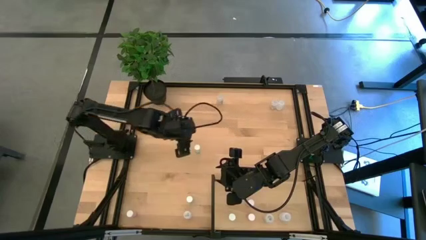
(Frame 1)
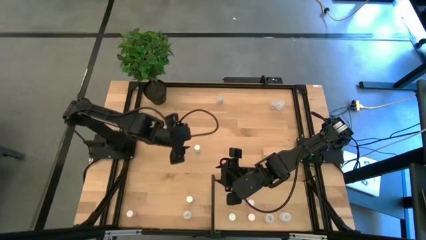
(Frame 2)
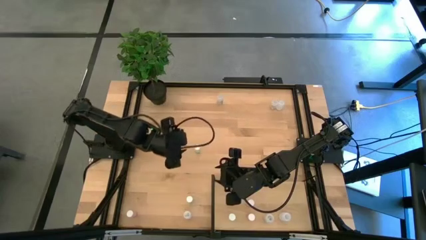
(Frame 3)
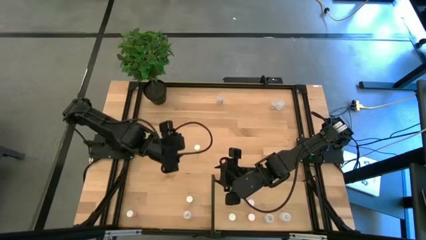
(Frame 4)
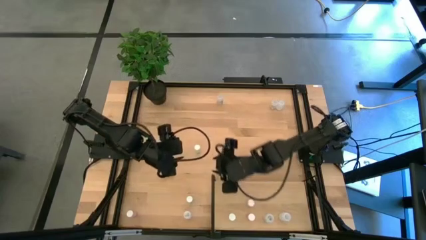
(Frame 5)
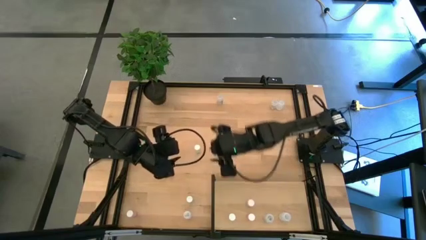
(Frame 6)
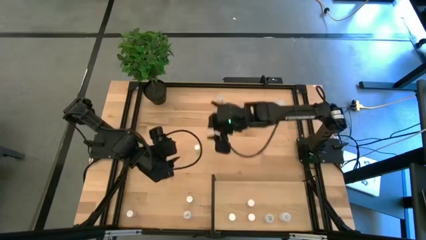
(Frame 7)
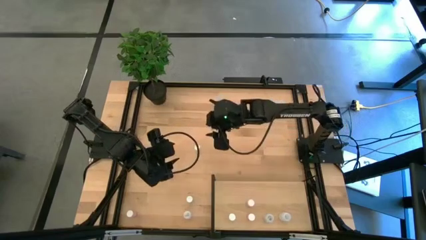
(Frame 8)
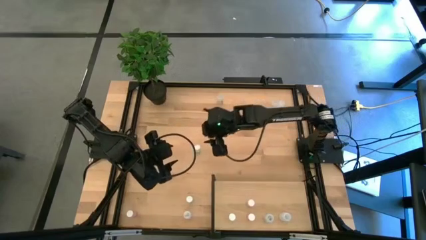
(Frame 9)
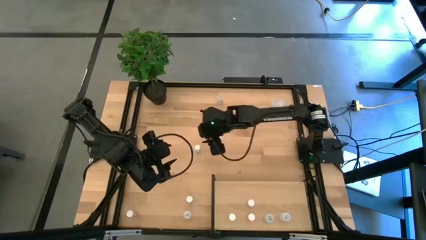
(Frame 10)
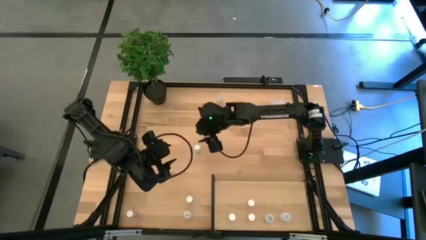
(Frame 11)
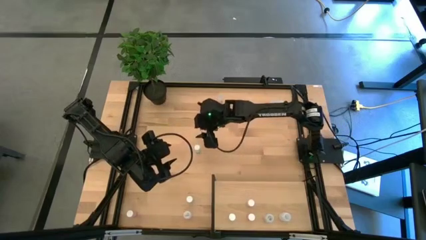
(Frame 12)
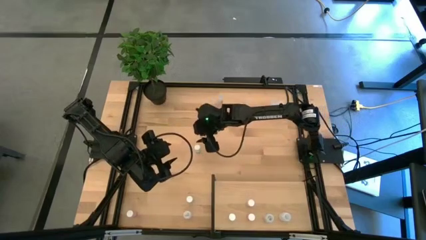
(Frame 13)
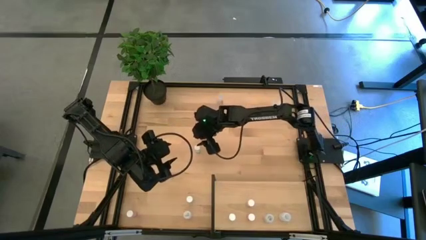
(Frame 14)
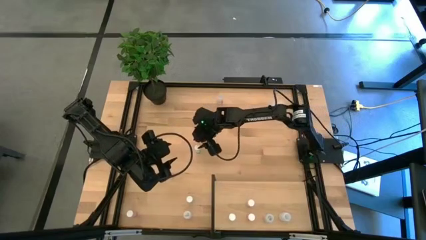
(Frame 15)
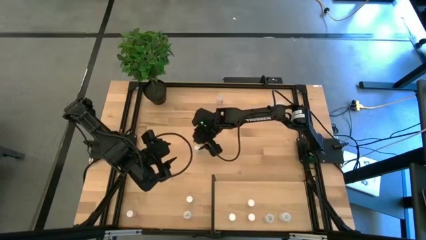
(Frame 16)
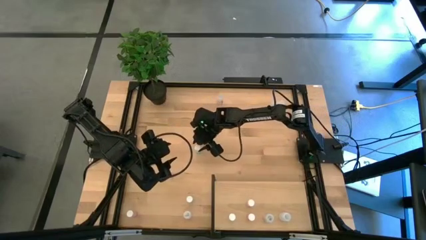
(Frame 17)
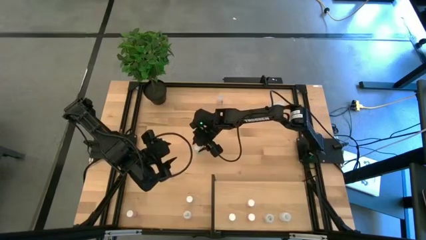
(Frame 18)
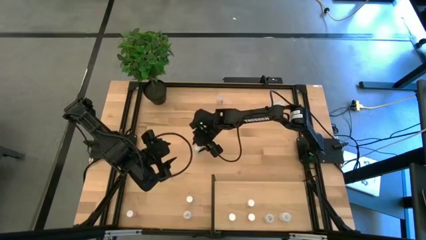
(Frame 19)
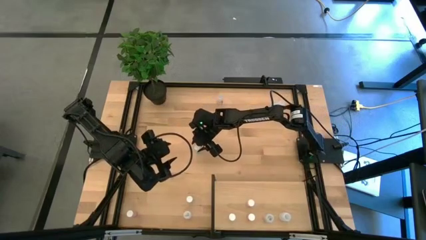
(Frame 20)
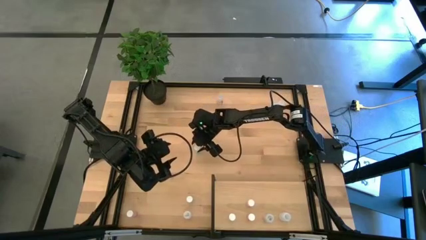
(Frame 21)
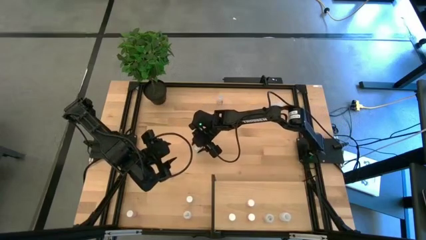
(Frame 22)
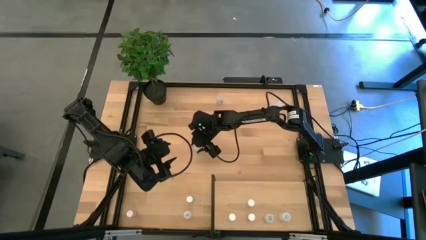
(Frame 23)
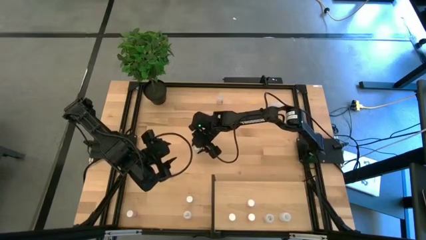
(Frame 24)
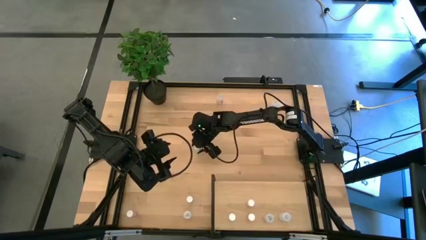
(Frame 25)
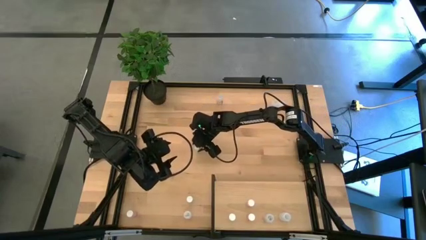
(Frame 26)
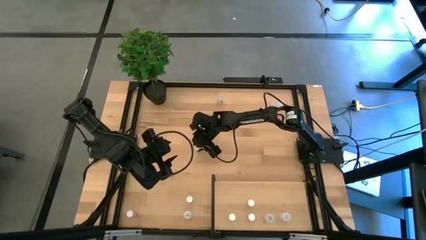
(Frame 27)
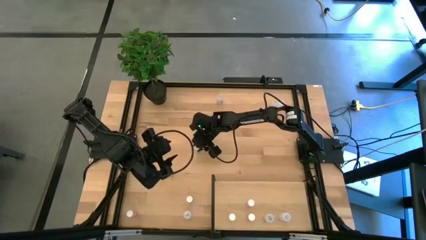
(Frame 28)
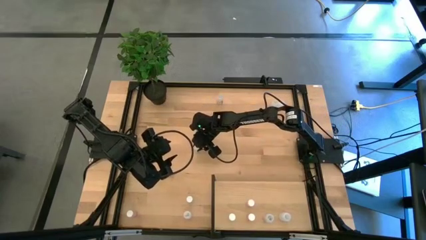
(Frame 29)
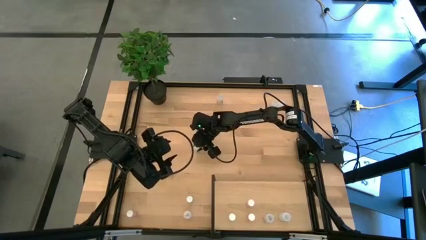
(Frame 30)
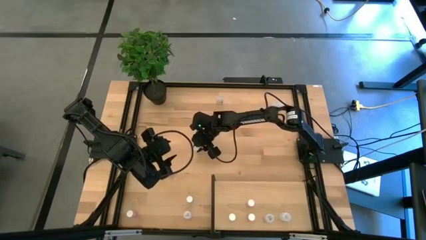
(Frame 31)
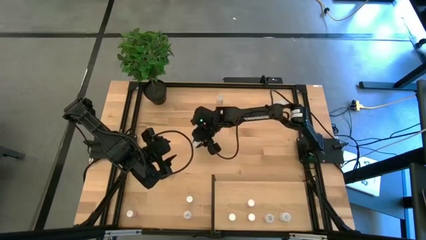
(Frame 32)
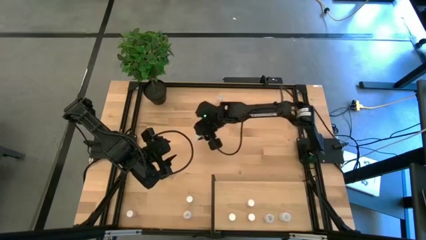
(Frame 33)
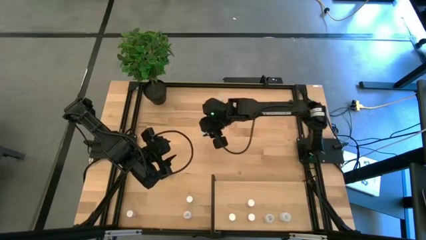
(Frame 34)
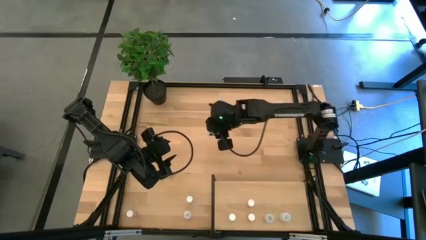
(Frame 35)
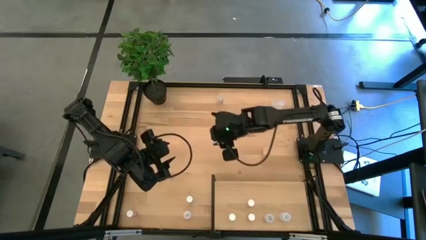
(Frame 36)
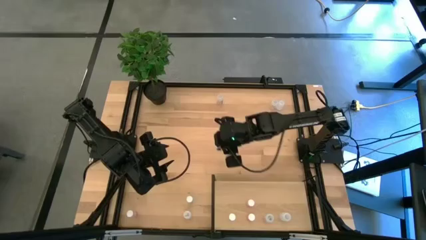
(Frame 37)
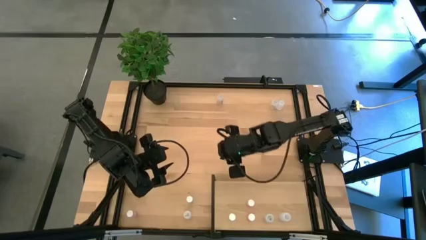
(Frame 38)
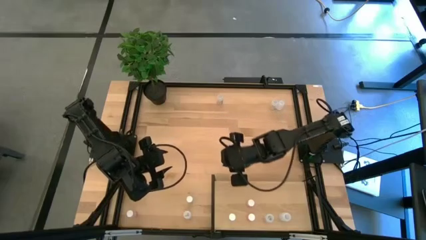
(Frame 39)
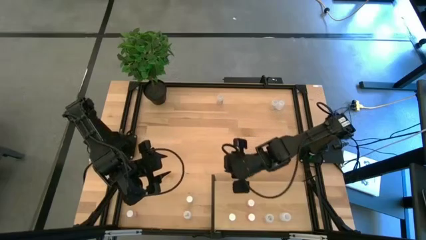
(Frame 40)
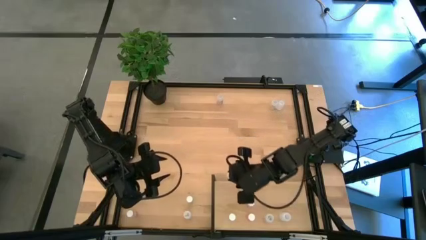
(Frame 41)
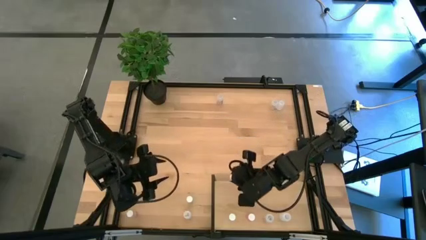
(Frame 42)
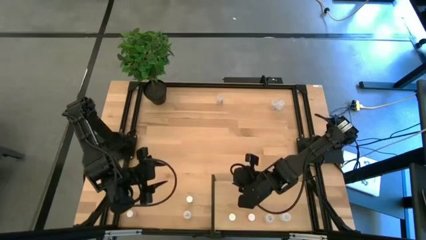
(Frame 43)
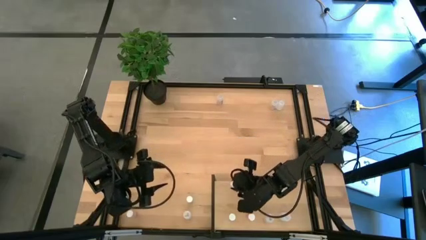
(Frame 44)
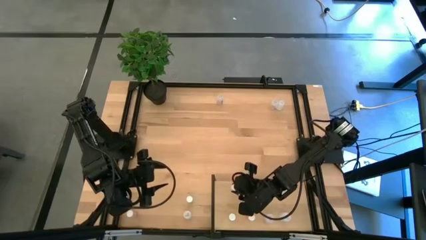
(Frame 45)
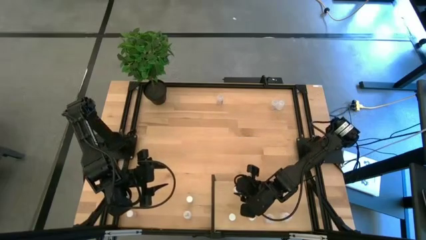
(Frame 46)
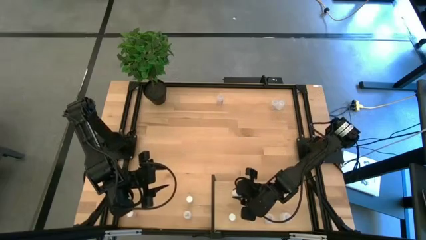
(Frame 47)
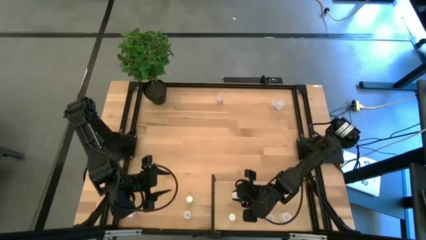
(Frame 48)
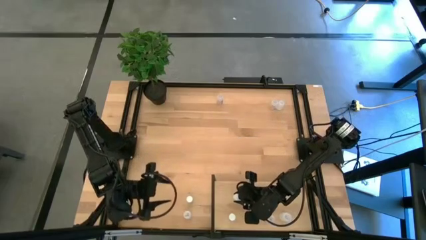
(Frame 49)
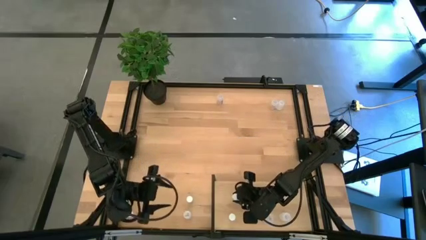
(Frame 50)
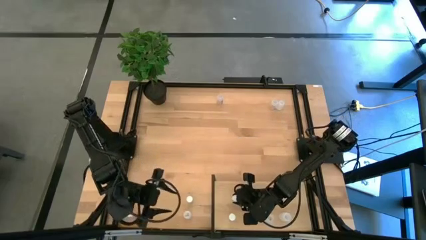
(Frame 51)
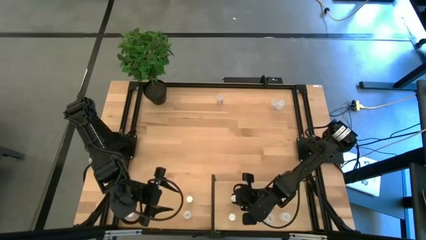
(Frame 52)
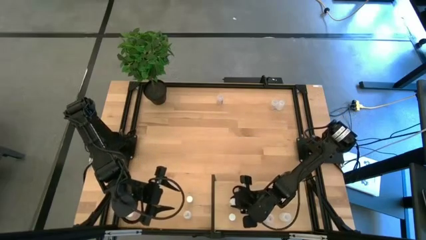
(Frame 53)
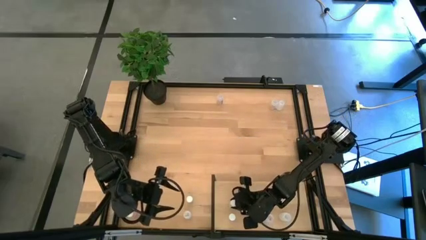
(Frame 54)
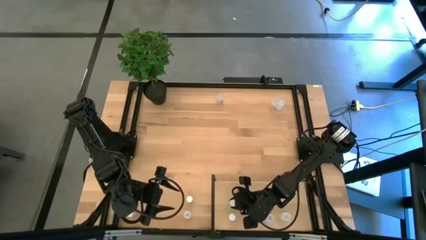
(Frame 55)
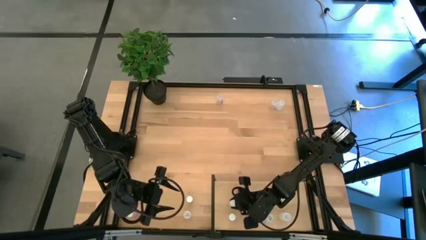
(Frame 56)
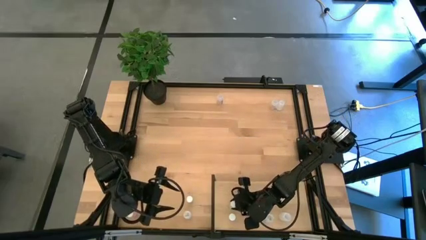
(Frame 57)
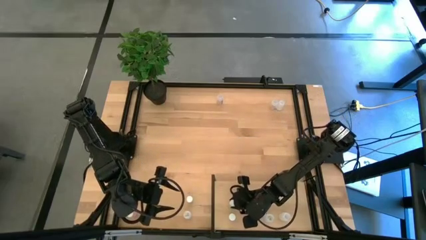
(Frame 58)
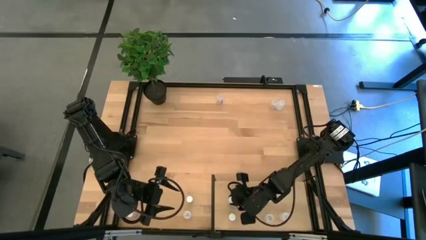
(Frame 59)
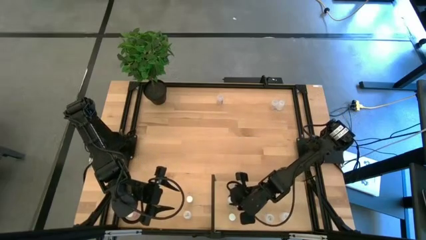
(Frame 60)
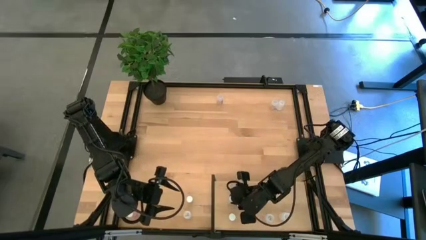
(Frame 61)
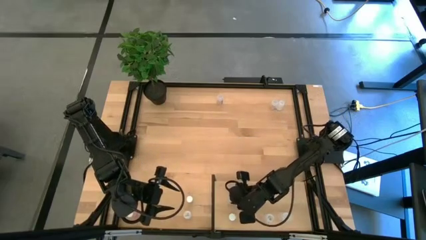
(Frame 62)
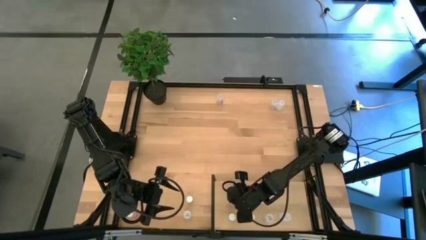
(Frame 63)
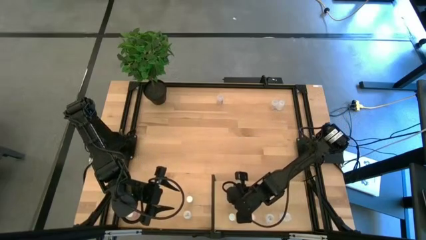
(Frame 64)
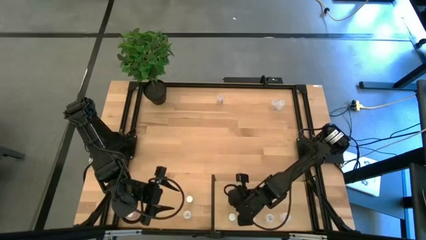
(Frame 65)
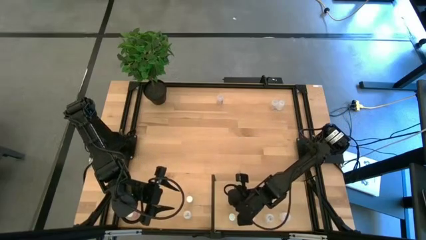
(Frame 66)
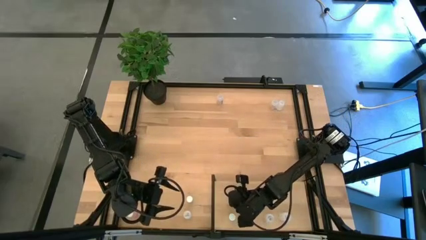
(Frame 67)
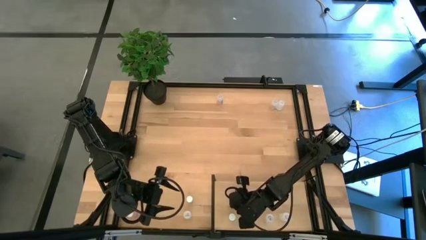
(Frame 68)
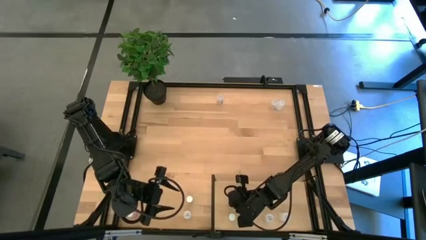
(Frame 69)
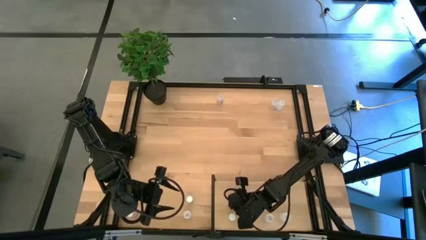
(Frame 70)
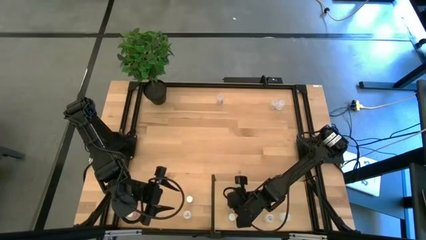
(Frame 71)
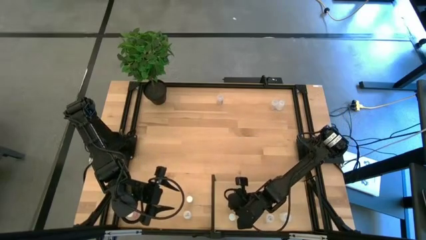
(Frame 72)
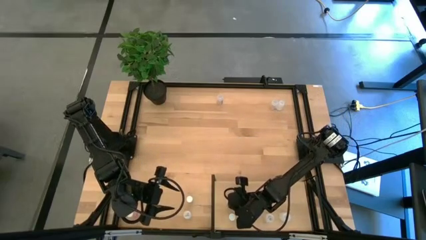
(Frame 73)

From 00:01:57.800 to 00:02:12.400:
Task: Pick and place medicine bottles onto shelf by color
Put the left green pill bottle on the shelf aligned with the other green pill bottle
